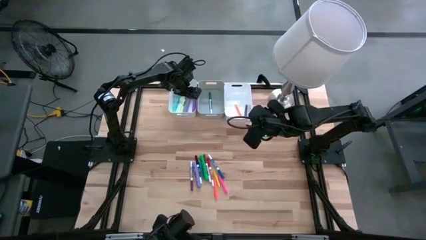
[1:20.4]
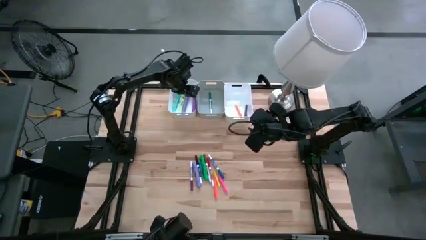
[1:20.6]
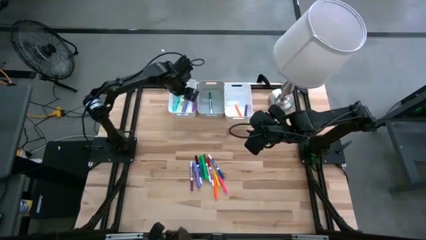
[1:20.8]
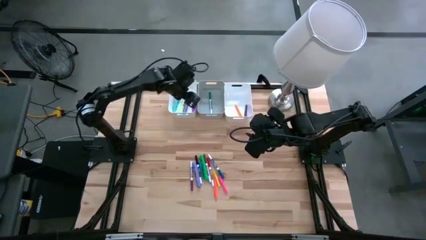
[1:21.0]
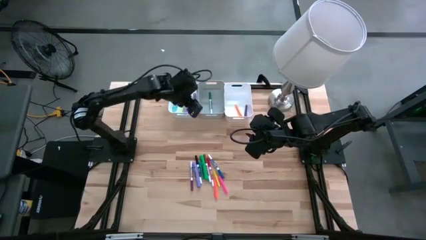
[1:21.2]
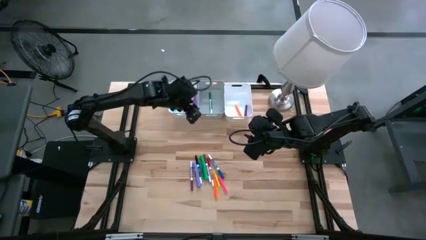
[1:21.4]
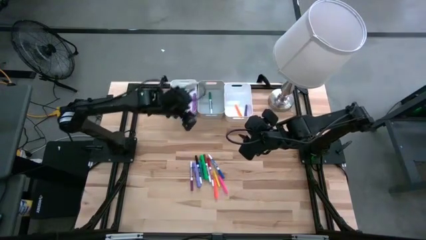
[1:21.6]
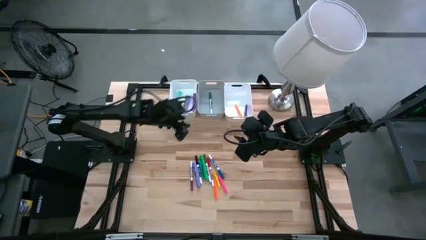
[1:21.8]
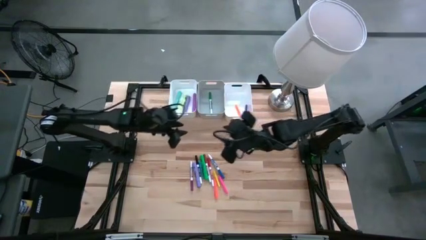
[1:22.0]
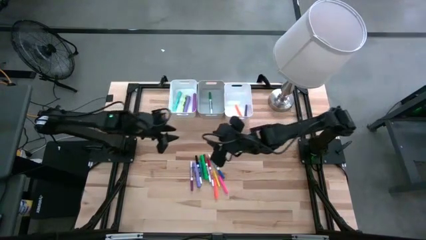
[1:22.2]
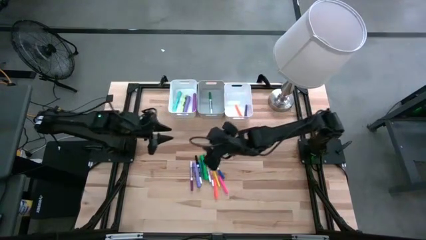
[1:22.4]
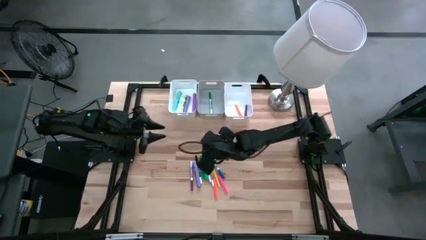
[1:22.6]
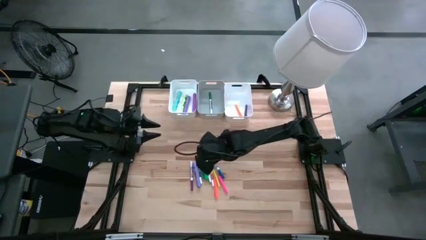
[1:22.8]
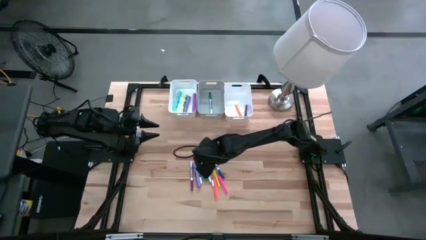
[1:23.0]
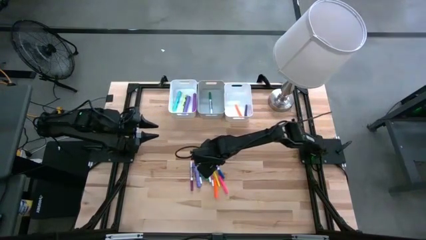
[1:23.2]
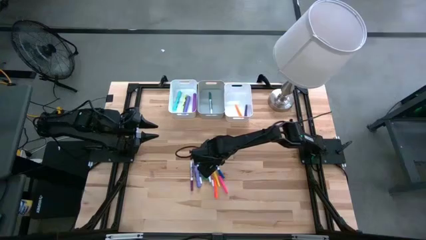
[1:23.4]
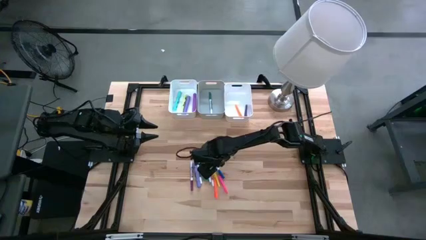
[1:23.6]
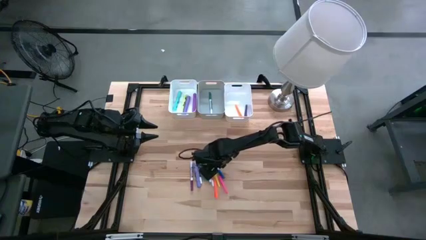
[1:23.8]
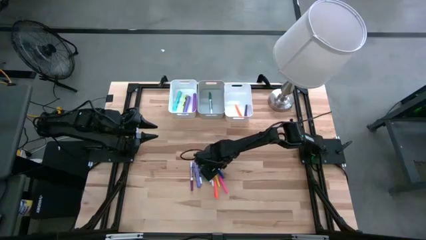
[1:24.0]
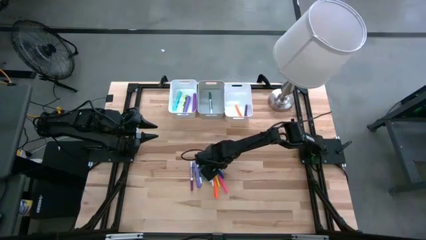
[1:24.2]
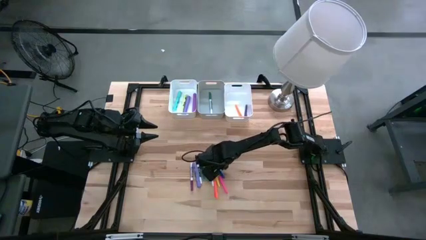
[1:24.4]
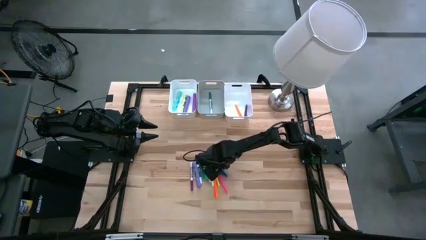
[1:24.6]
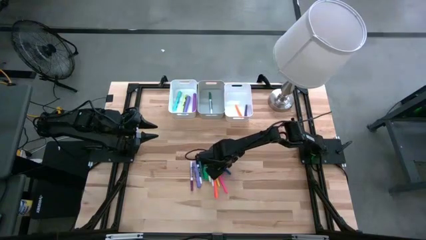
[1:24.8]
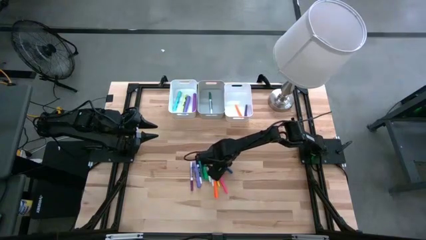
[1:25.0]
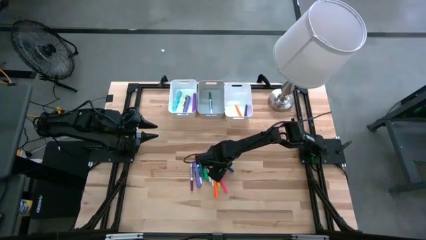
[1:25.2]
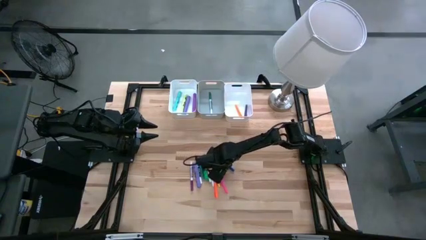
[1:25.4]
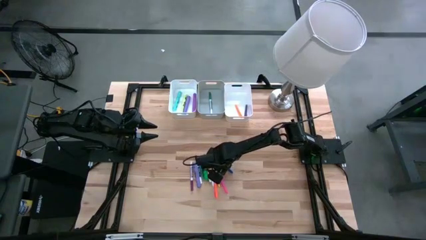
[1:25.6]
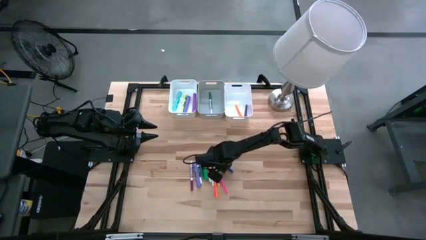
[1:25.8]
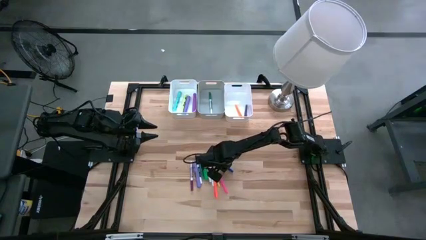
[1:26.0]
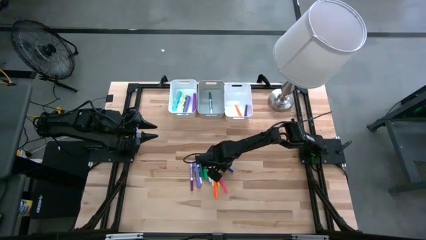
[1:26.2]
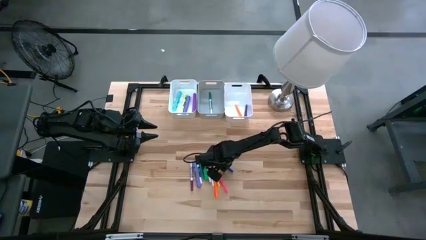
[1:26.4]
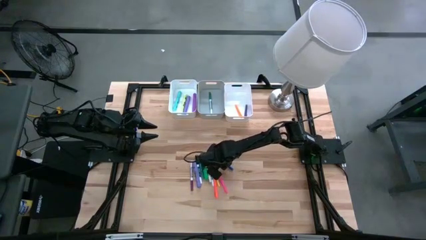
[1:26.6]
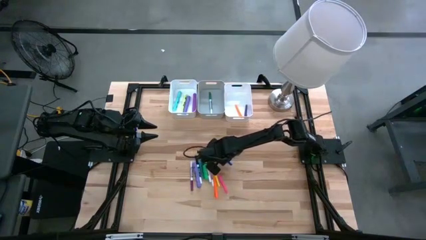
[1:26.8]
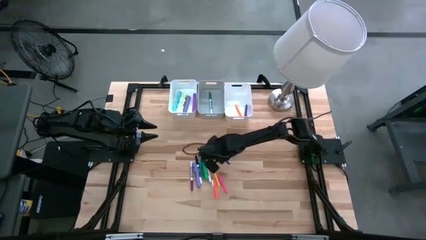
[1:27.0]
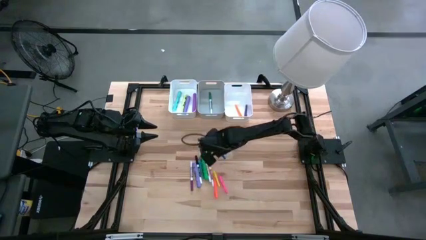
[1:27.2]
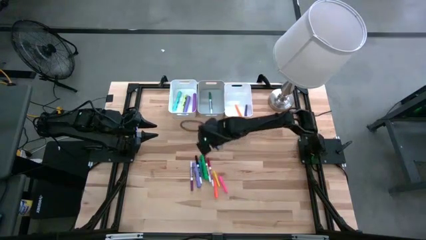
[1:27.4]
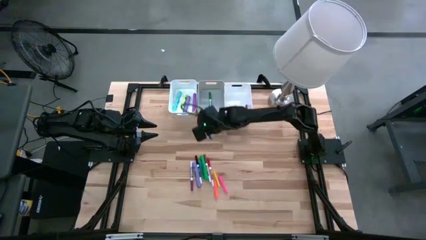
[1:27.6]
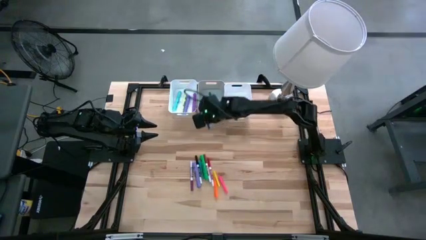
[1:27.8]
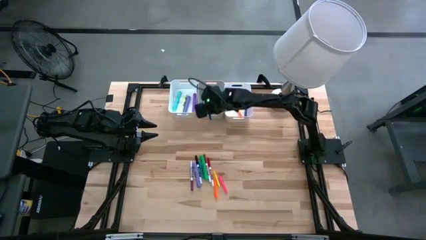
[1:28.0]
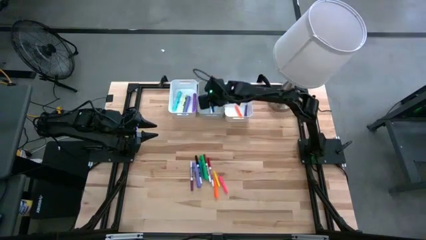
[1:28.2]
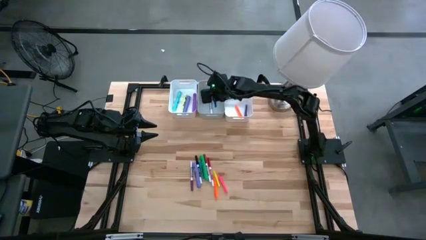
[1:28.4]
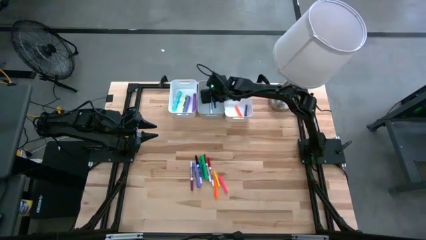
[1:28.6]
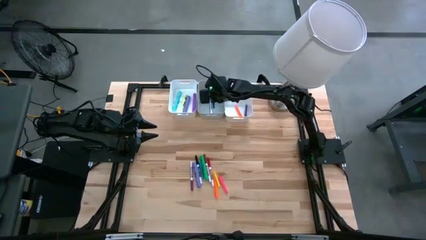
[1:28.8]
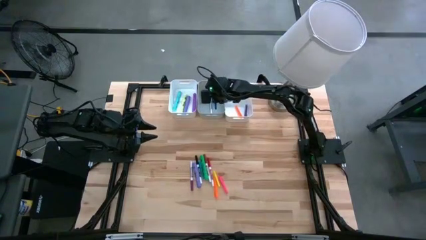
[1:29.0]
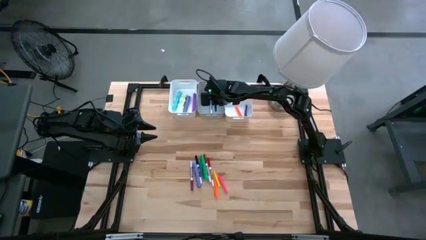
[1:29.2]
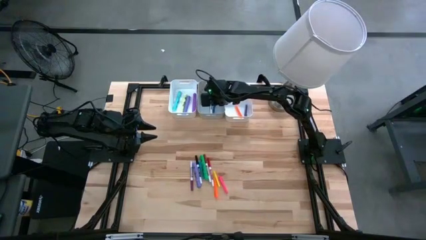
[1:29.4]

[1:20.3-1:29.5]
Task: Pick & Place Markers
Put the blue marker pen into the gray bin

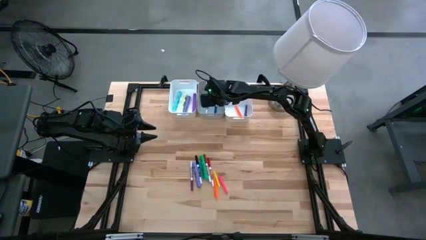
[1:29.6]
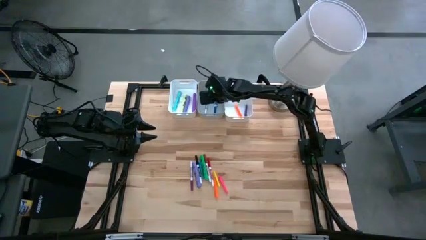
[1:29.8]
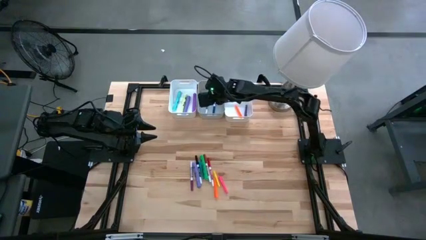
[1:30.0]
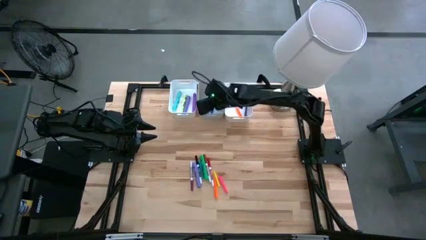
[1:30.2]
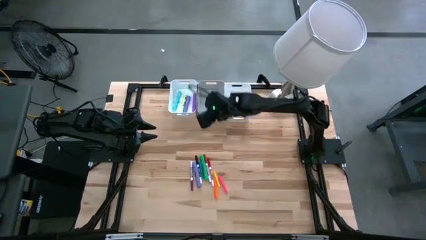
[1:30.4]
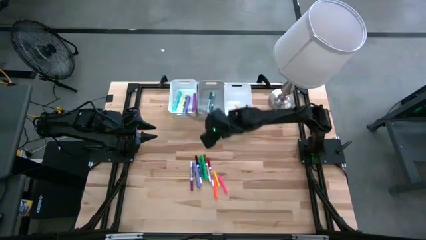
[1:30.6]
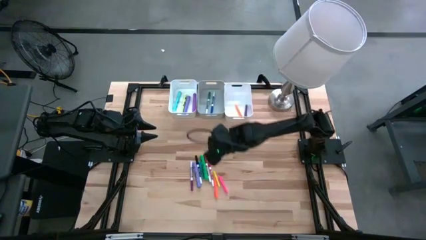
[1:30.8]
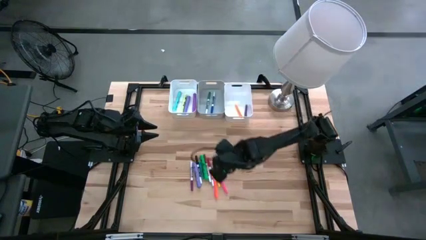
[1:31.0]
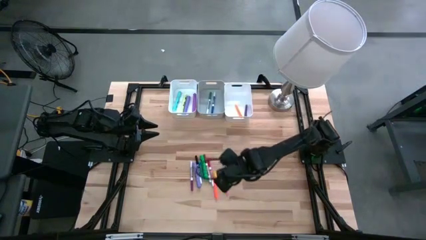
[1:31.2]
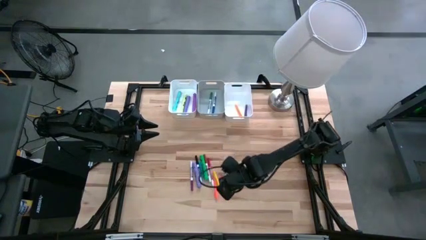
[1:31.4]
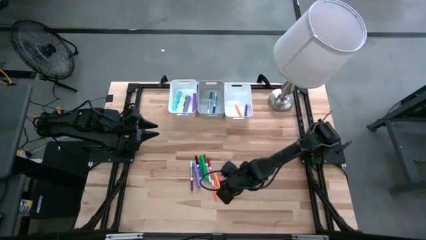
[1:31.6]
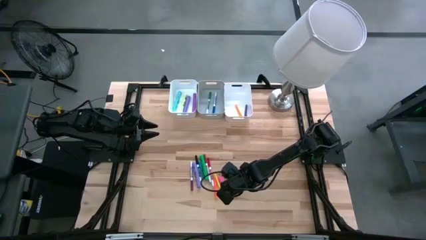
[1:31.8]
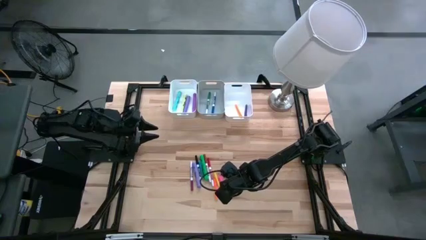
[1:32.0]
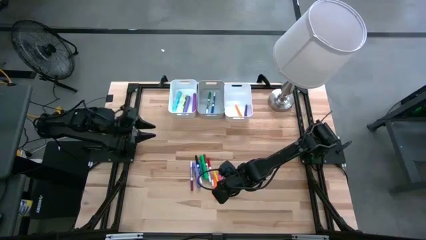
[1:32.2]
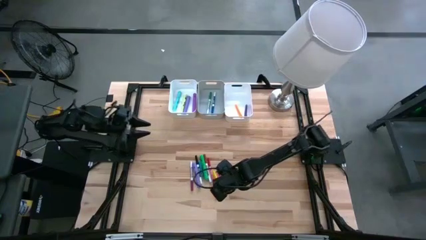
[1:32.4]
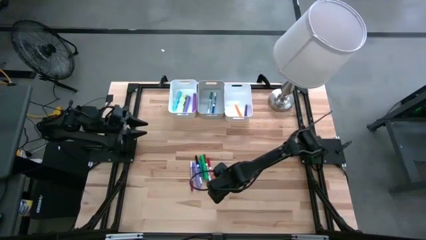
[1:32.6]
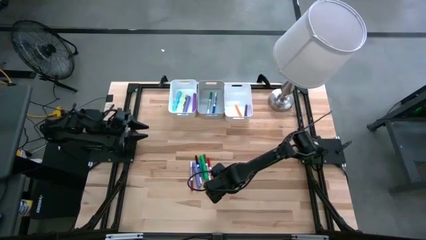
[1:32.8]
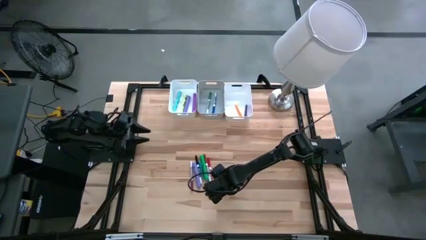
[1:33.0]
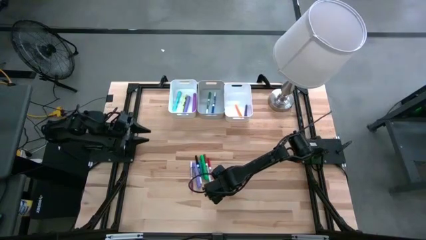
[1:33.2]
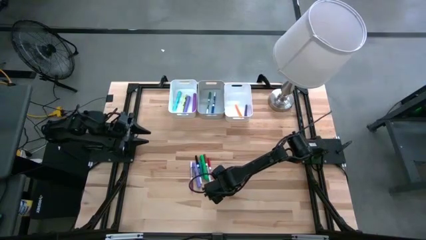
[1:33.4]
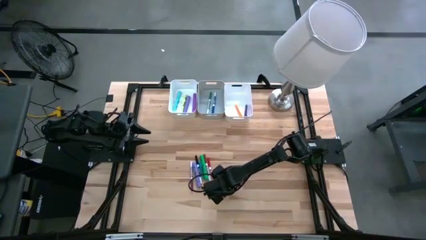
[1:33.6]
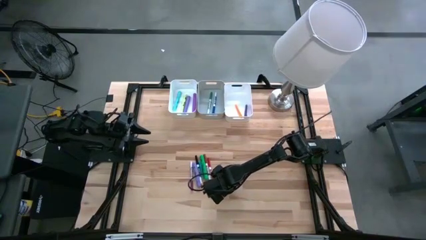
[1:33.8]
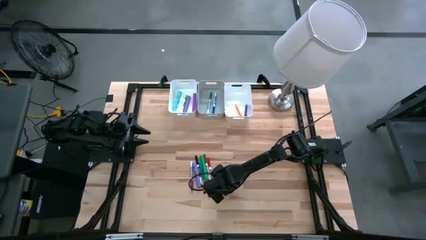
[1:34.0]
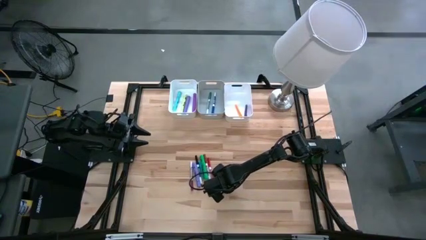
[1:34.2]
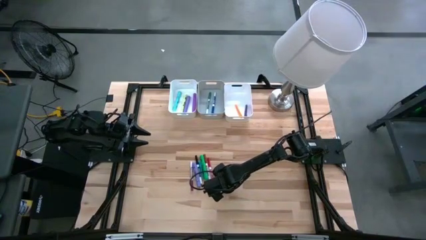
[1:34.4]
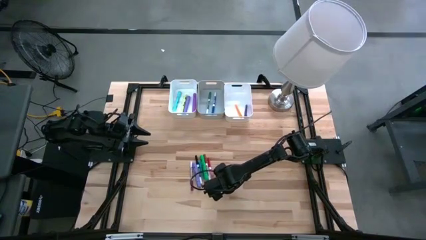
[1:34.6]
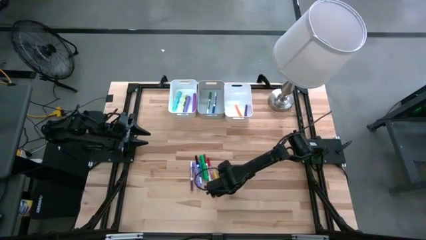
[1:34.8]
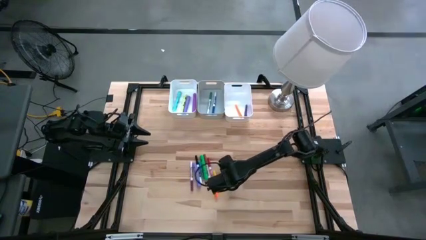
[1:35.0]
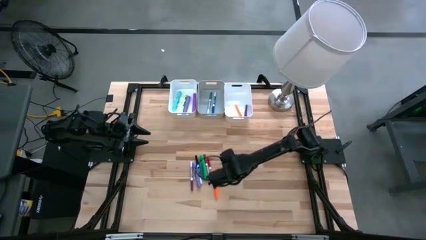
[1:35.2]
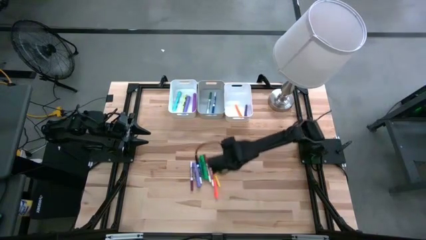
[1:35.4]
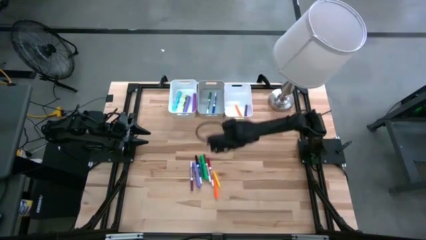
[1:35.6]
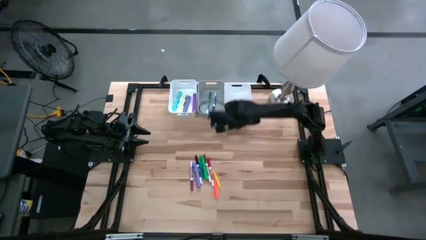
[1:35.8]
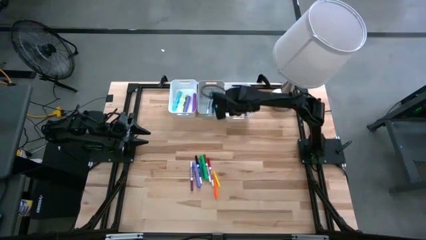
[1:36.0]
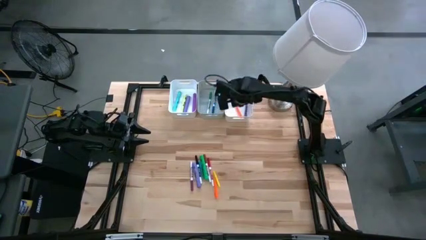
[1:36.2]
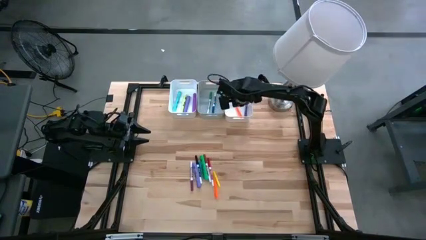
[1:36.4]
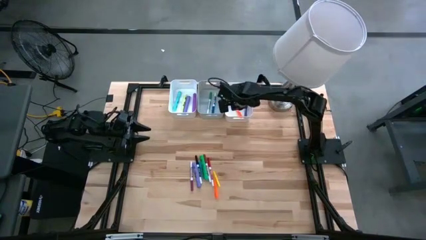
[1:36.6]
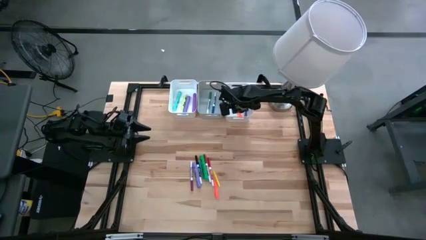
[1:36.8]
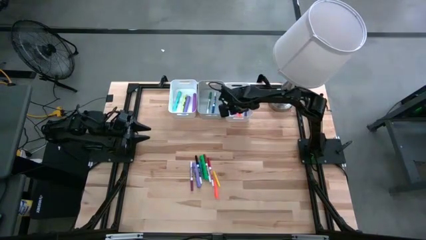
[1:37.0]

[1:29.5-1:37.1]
Put the pink pen into the right white bin
